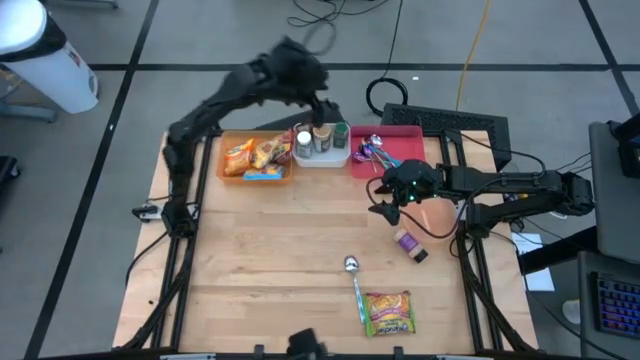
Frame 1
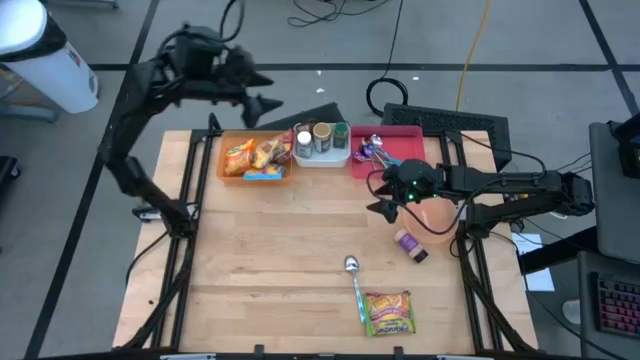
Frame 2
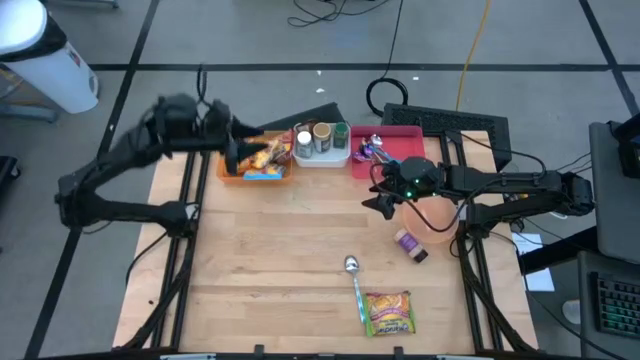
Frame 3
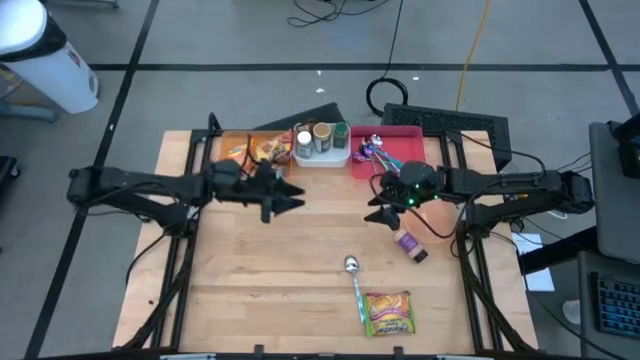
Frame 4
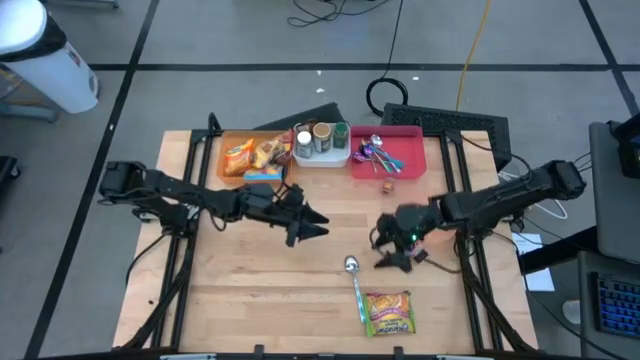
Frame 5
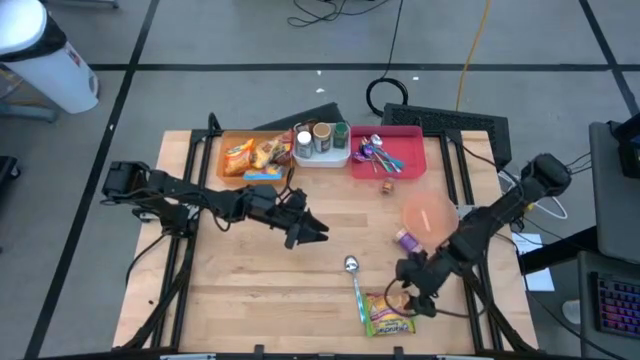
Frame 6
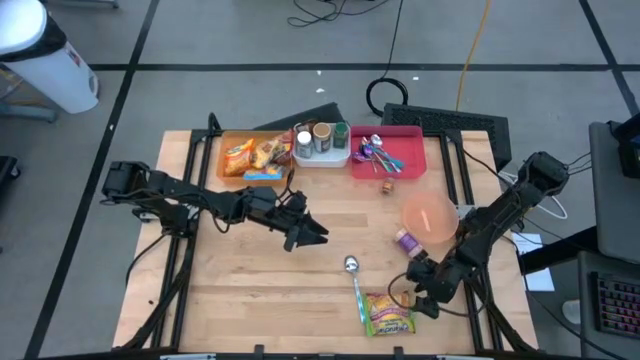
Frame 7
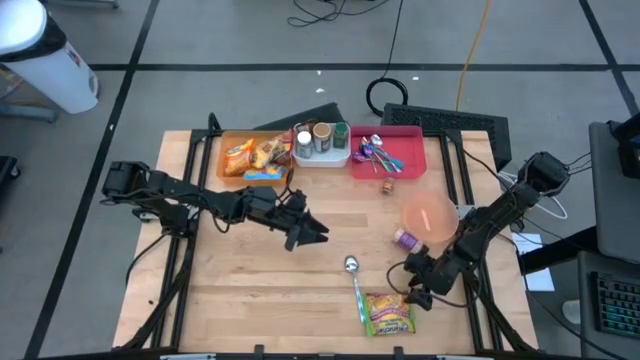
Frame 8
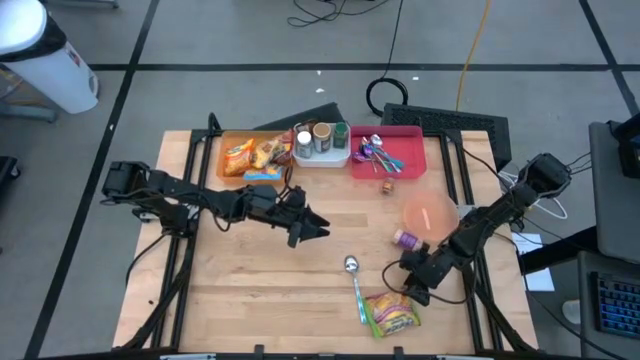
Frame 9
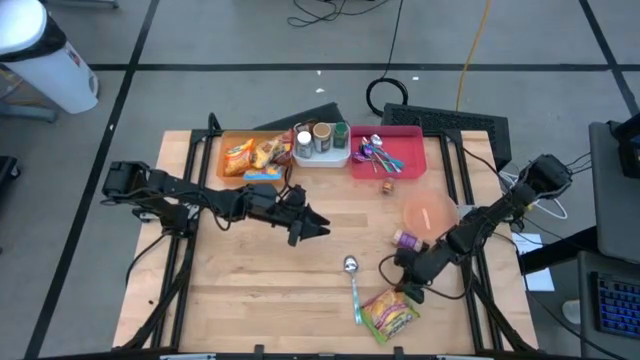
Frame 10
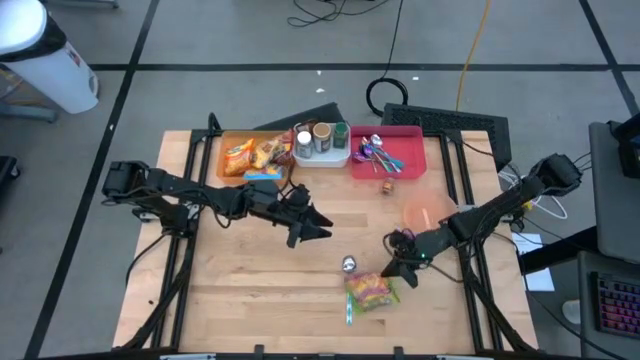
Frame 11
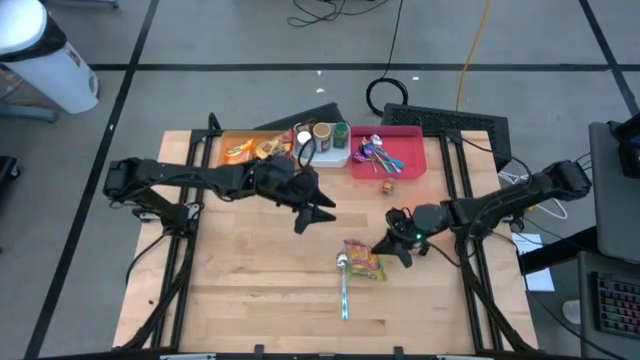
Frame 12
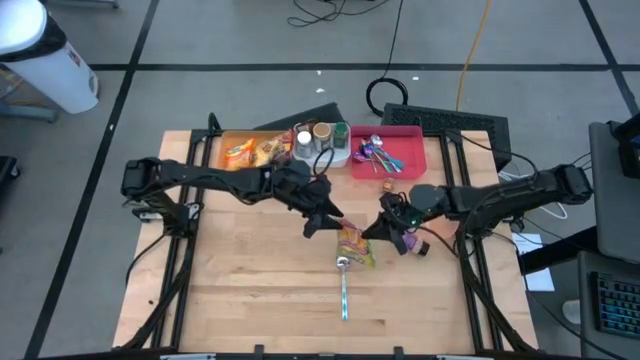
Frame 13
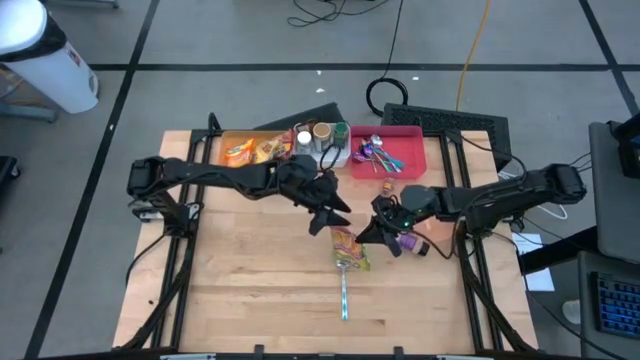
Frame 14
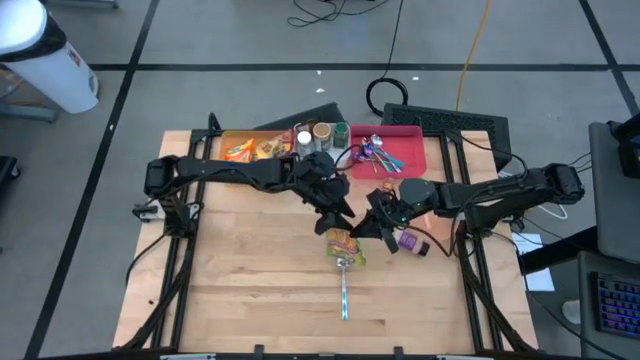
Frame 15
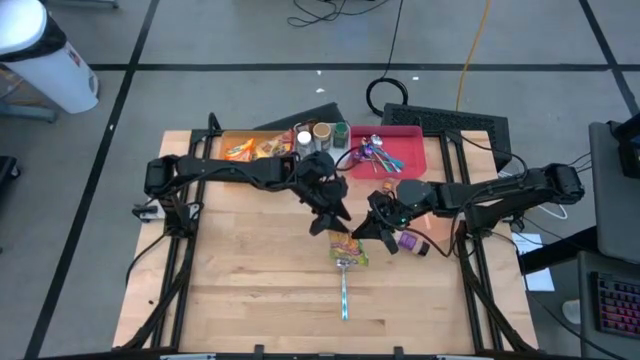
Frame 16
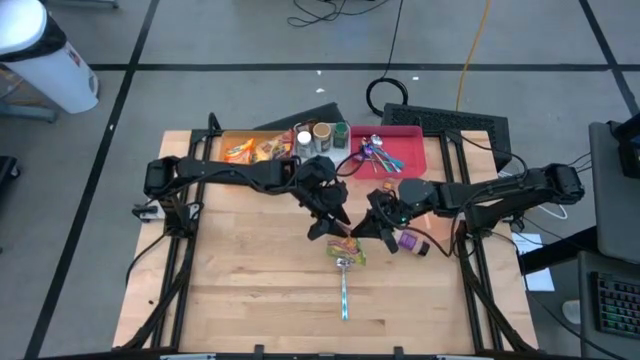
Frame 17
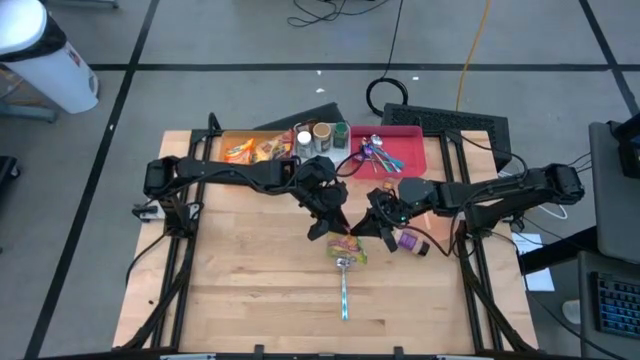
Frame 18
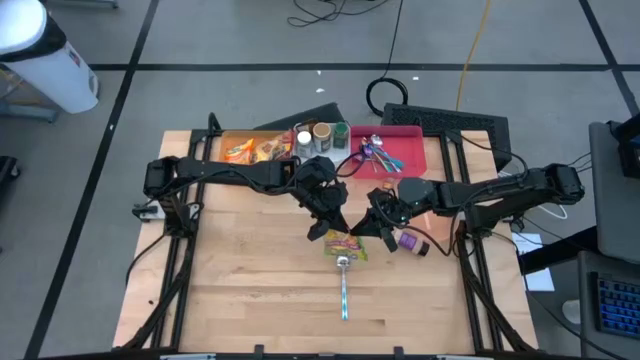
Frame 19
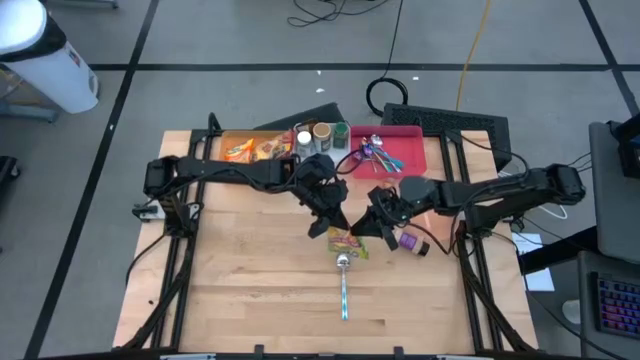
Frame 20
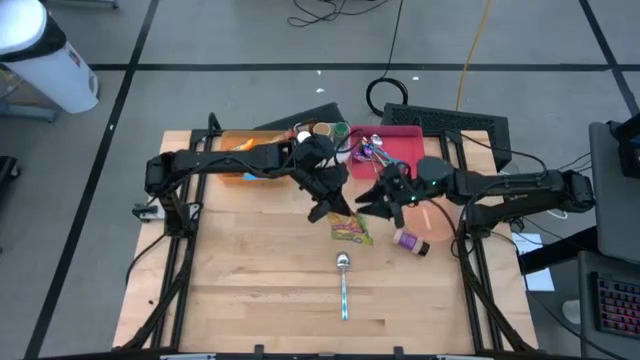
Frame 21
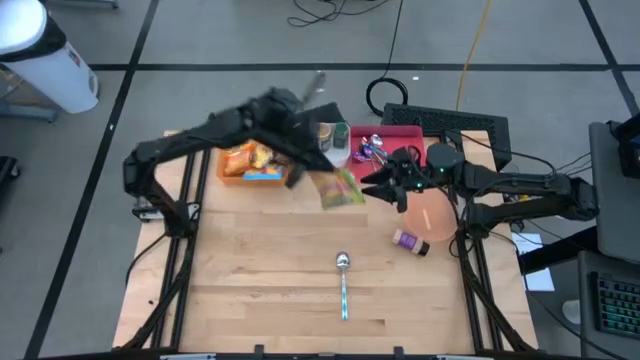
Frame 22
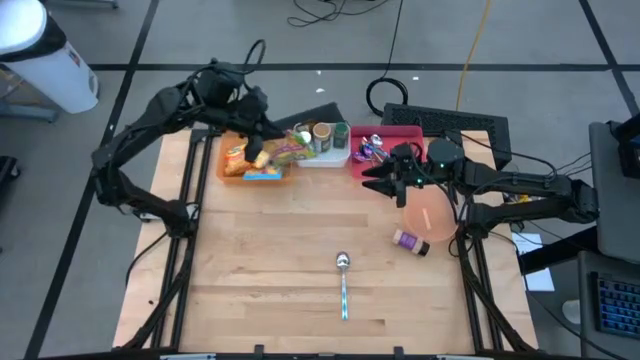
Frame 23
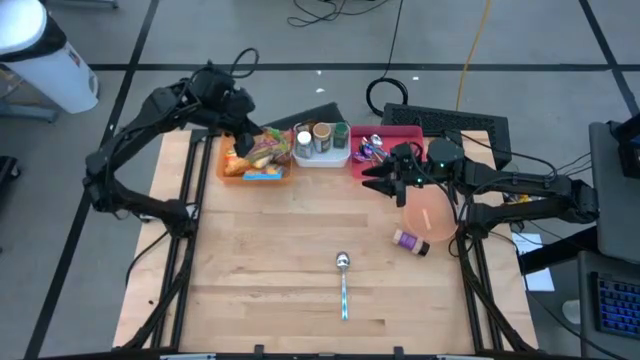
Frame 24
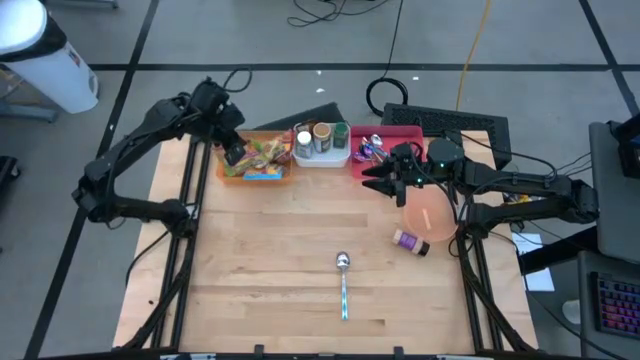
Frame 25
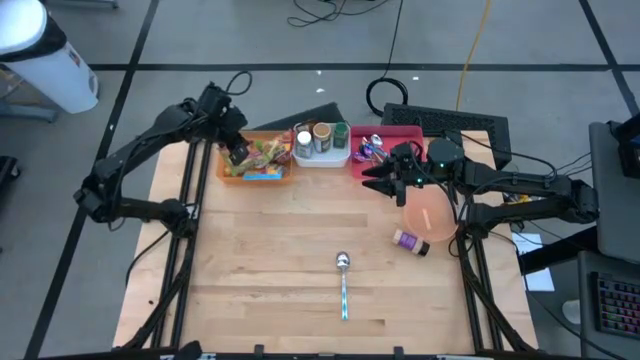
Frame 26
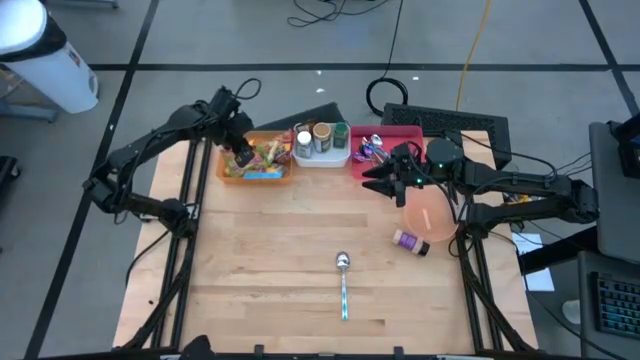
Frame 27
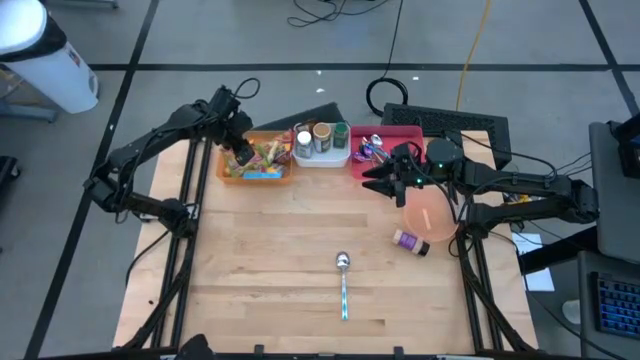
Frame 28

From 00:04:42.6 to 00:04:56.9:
Task: Pick & Place Food Item
Put the green noodle pack into the orange bin

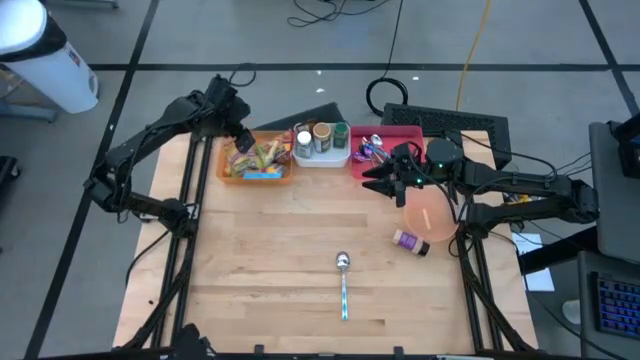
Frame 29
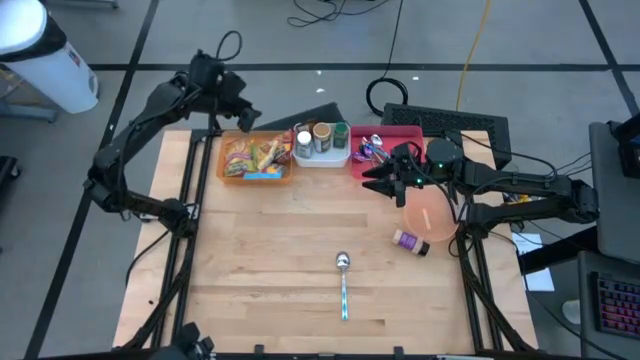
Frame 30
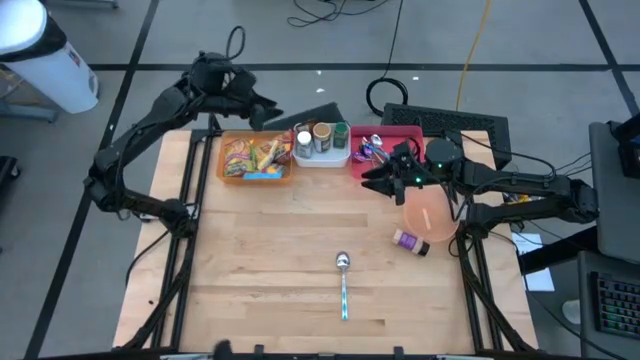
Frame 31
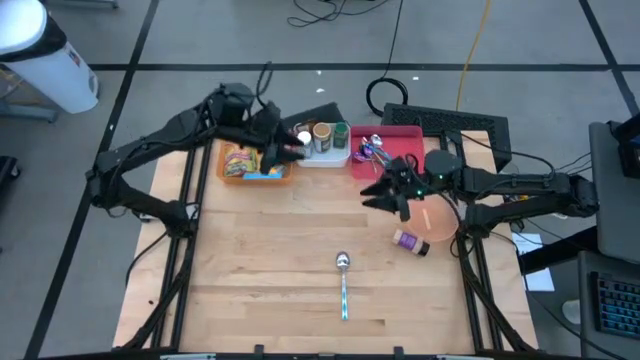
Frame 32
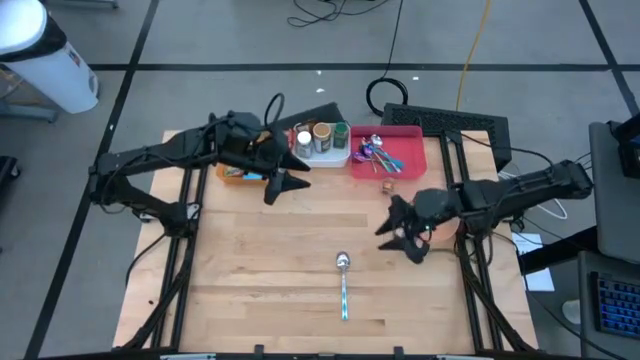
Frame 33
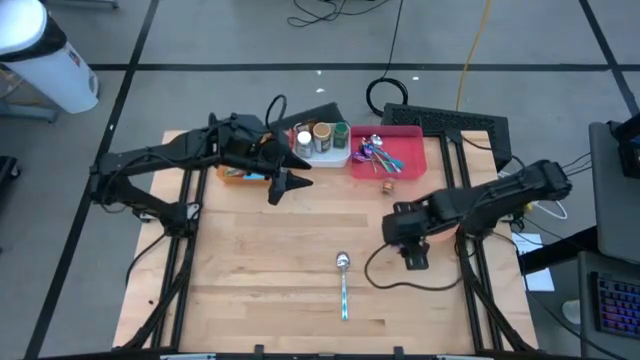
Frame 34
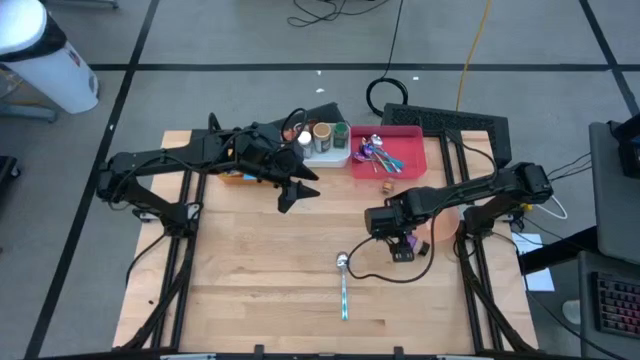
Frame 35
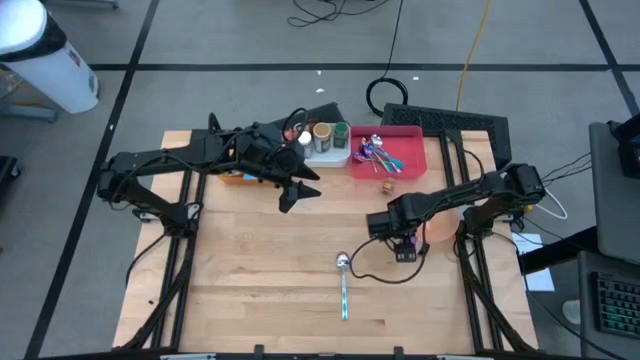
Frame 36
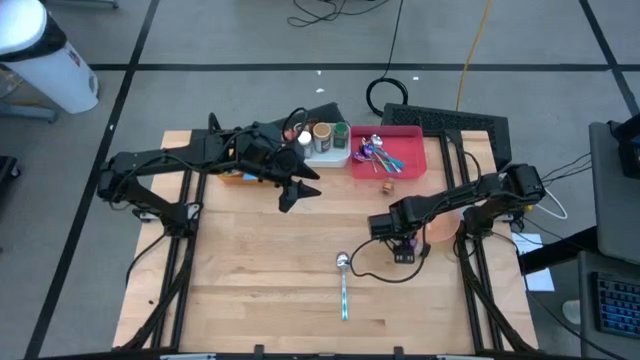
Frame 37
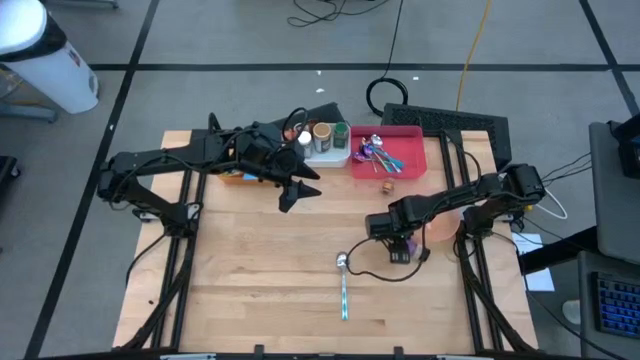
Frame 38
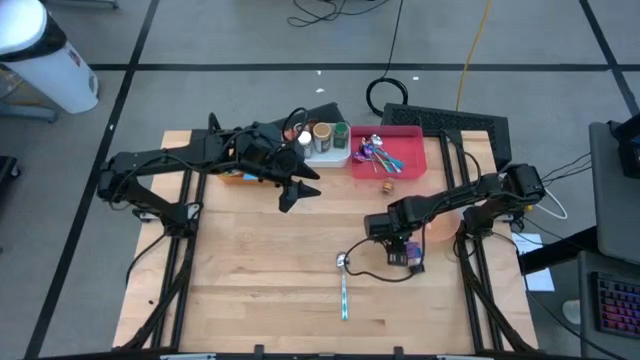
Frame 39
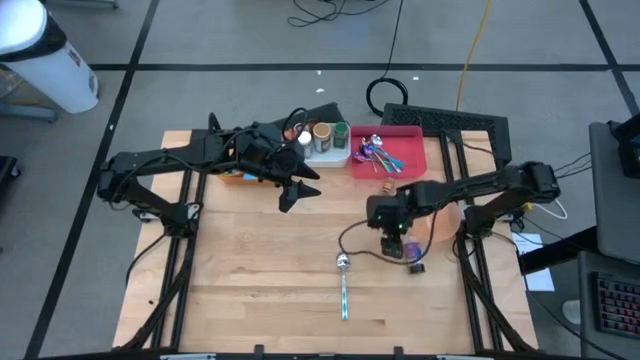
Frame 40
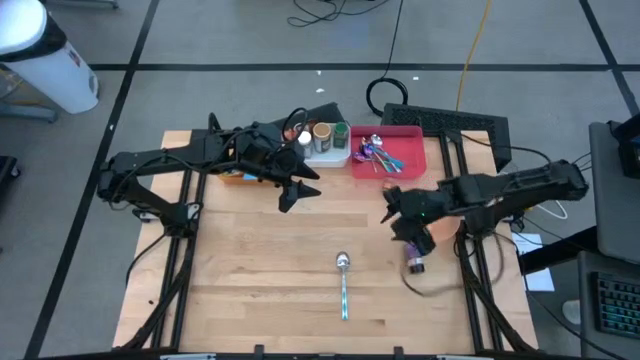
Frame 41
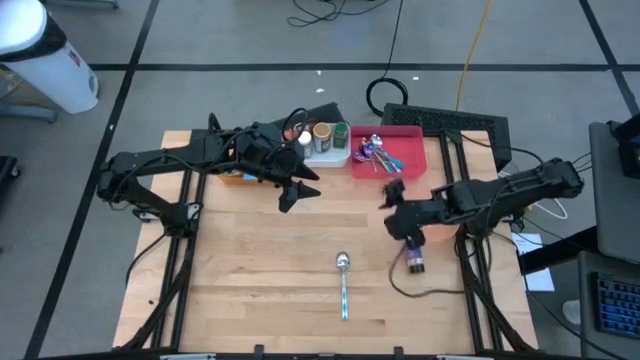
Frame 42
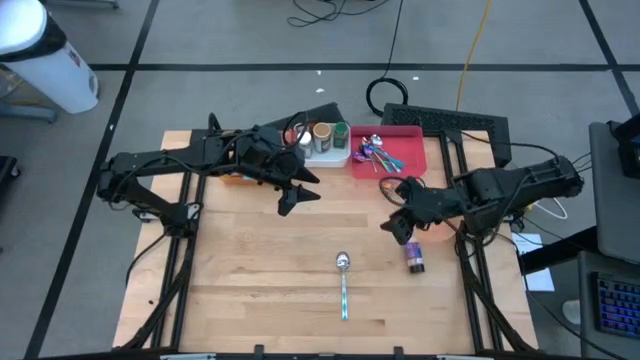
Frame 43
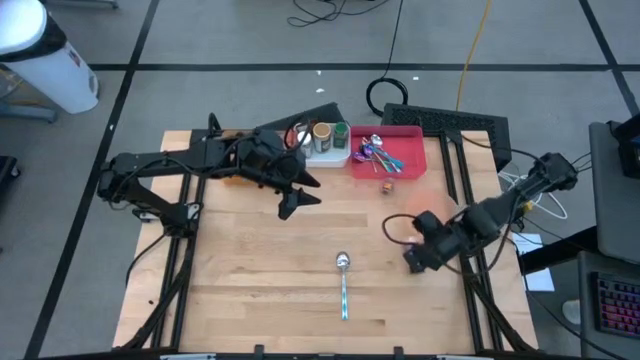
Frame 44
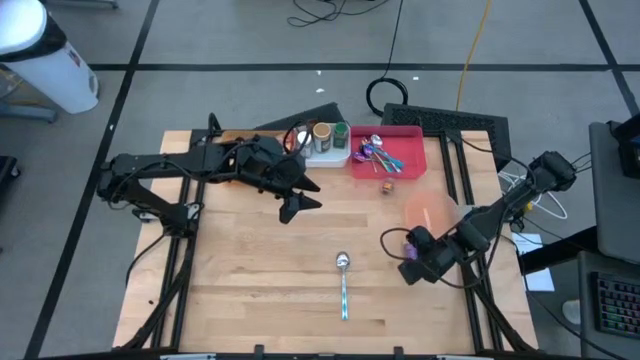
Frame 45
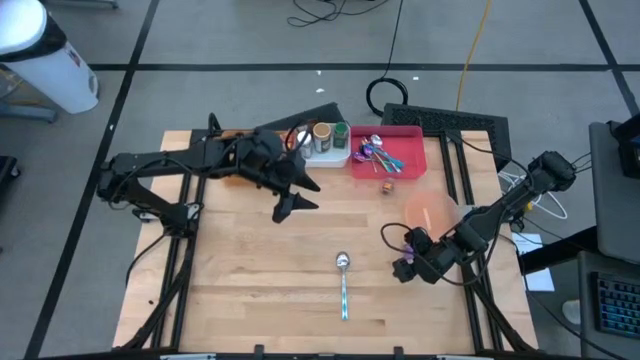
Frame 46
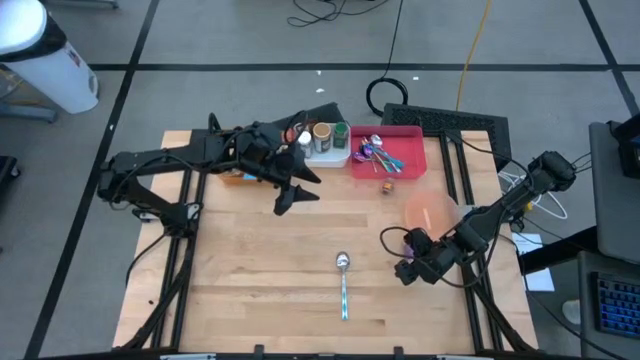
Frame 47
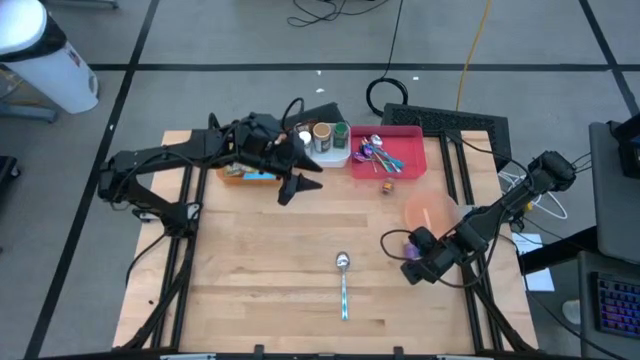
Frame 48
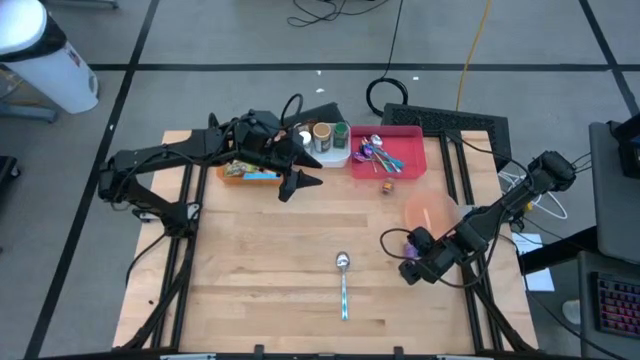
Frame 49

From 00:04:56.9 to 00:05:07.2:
Put the purple seasoning bottle into the white bin
